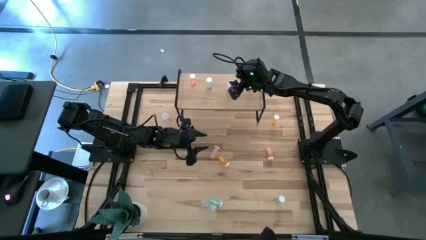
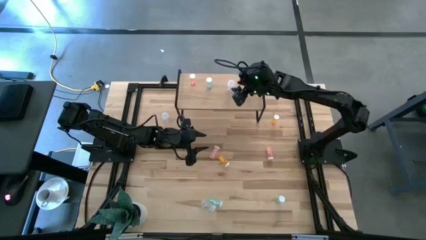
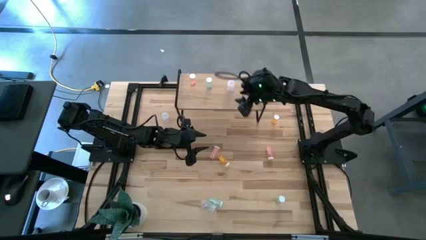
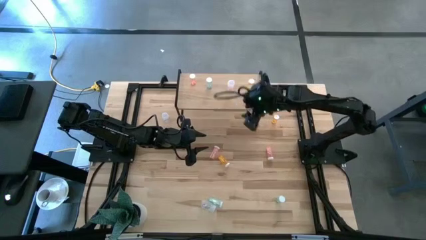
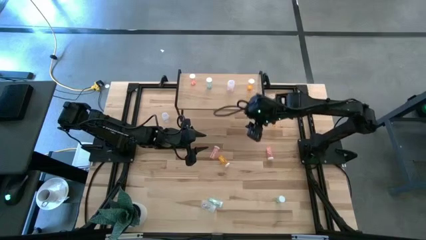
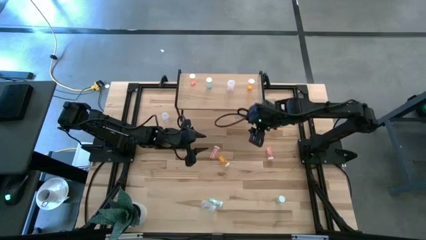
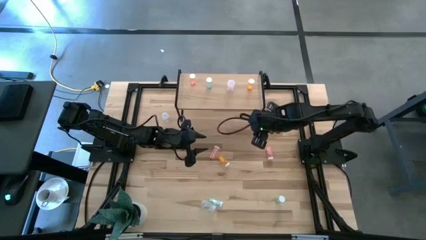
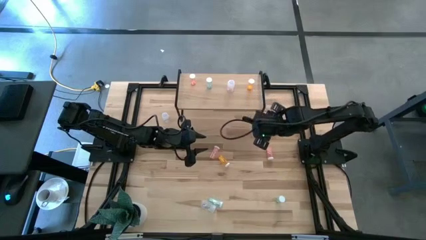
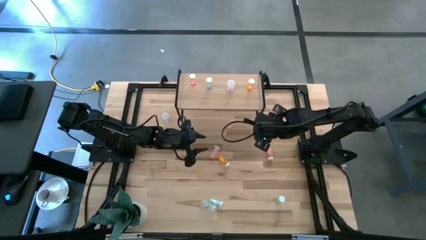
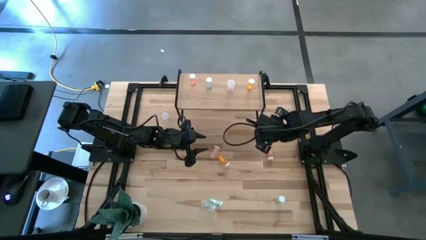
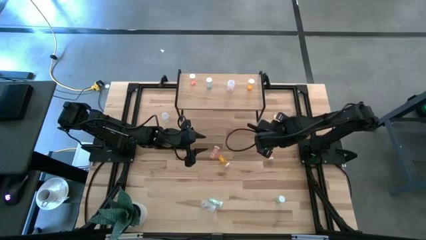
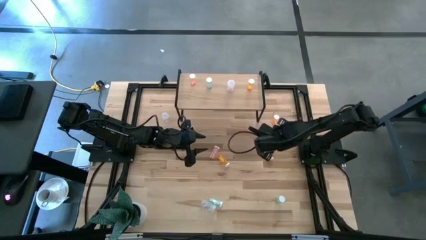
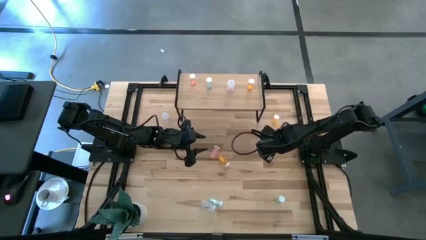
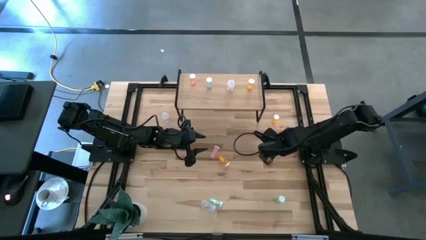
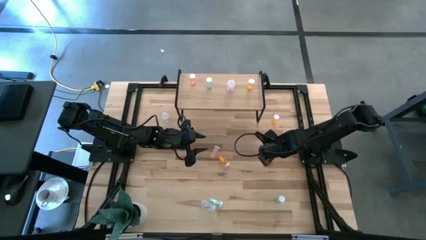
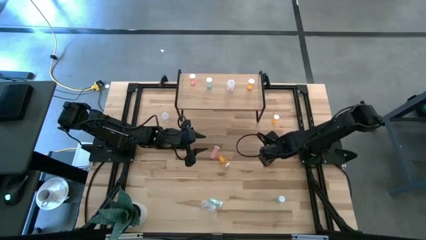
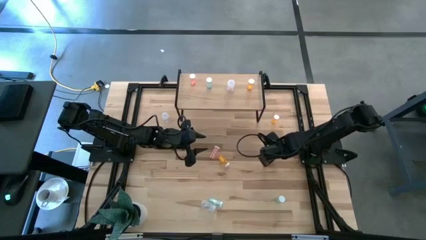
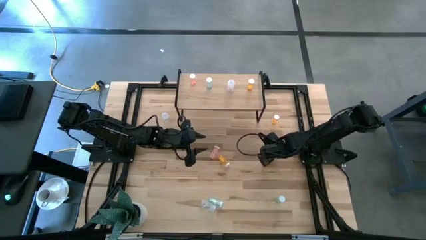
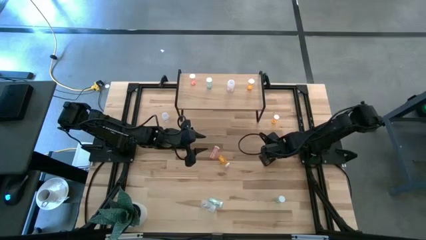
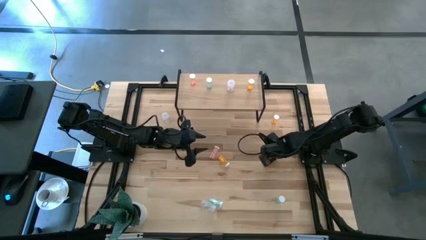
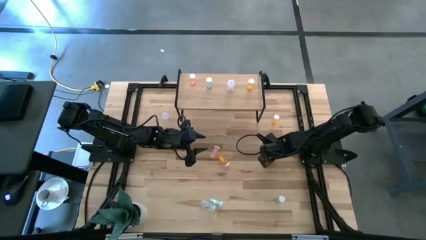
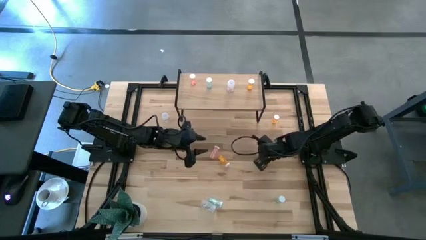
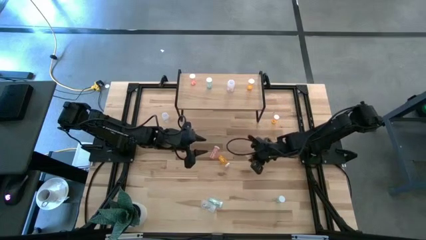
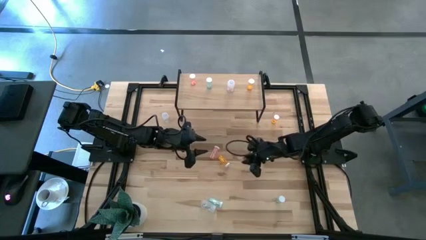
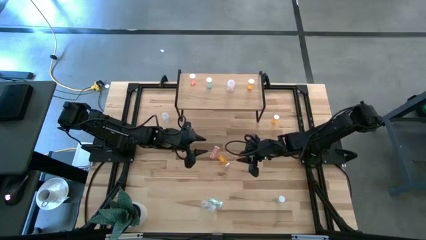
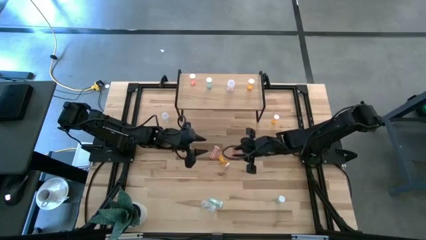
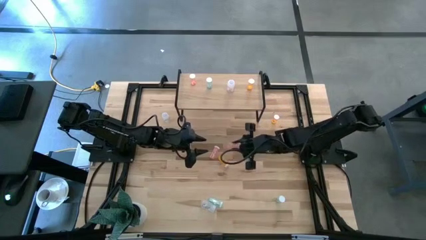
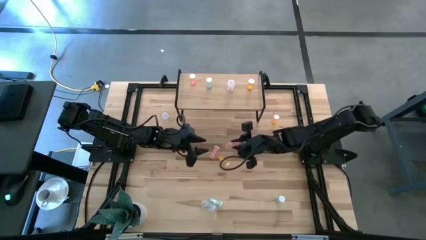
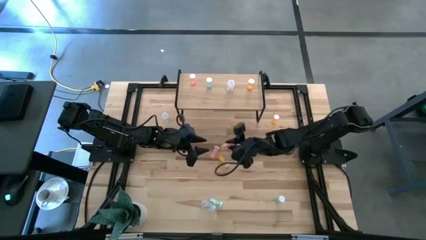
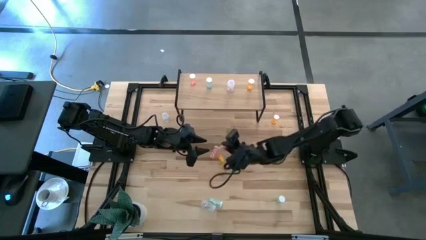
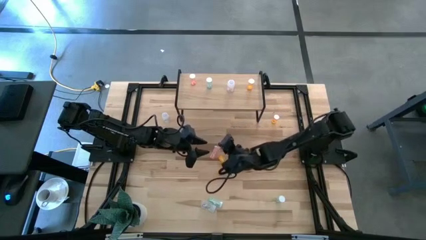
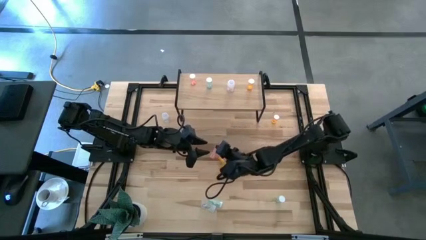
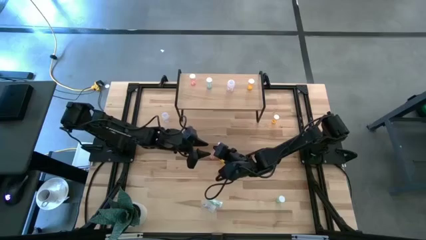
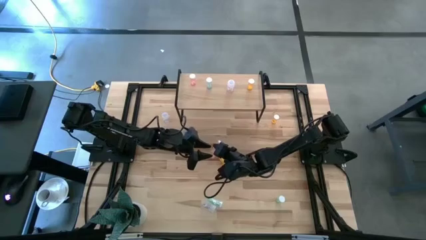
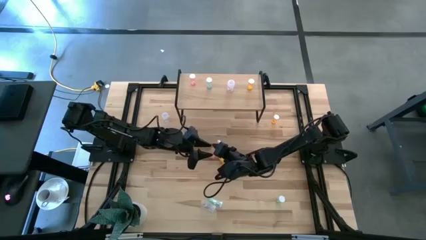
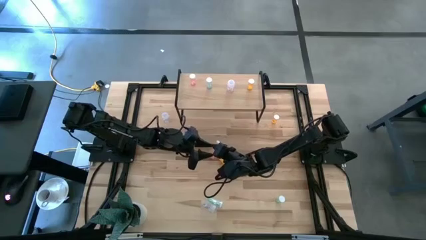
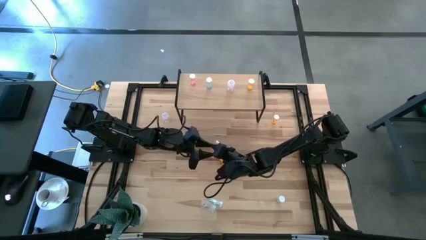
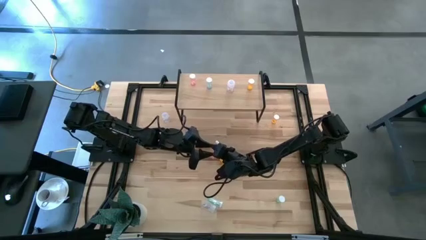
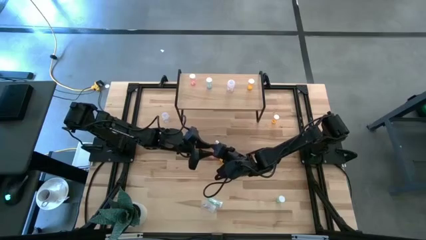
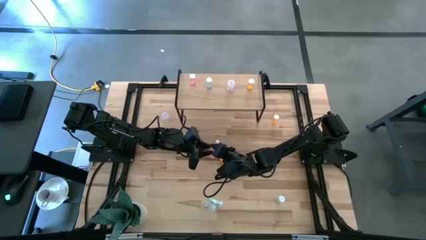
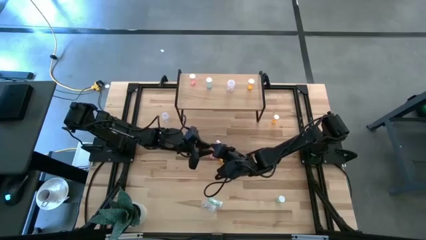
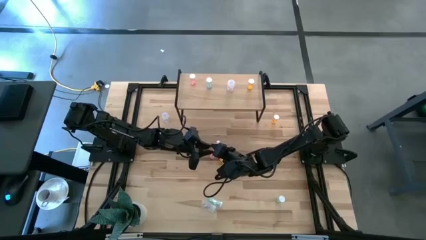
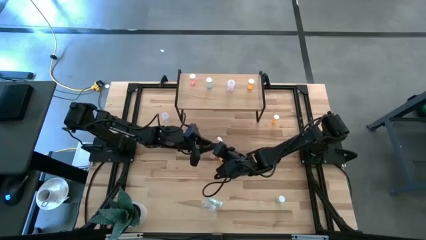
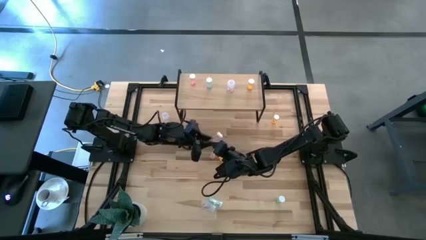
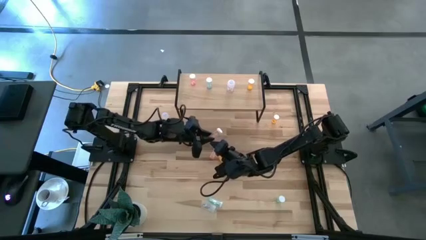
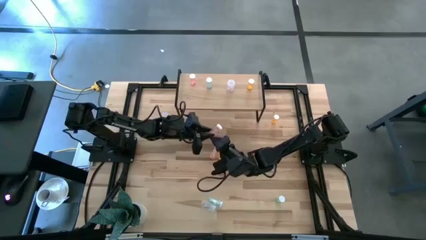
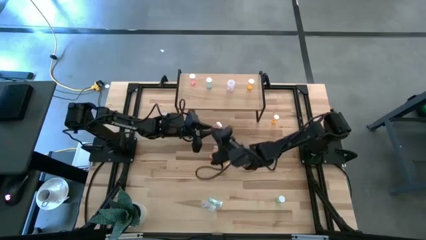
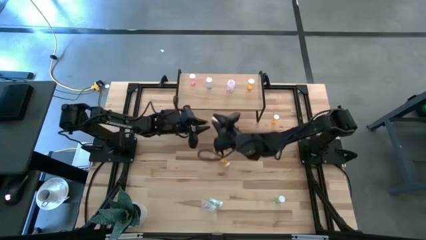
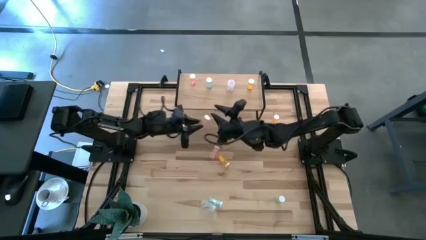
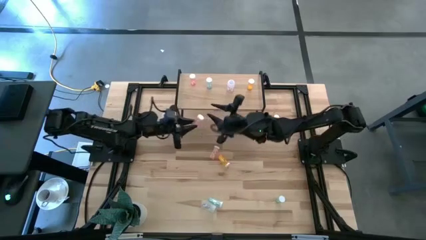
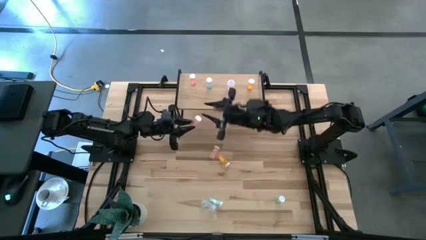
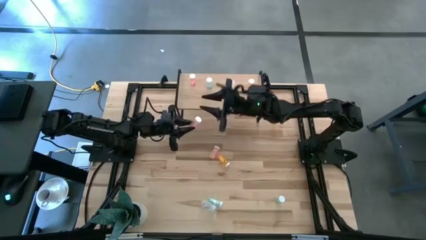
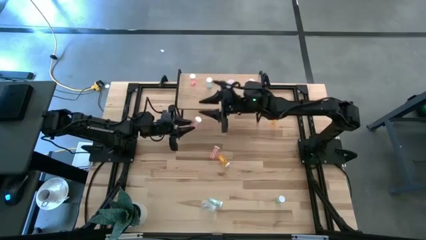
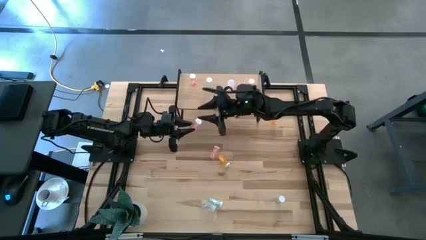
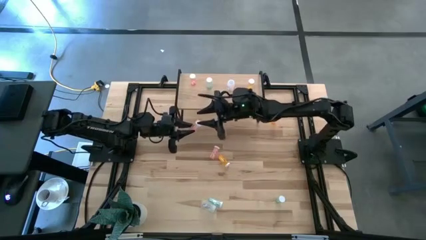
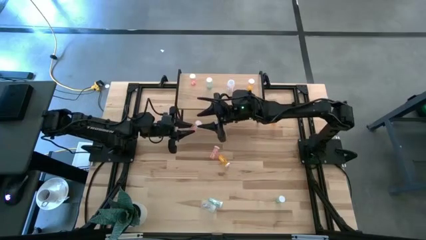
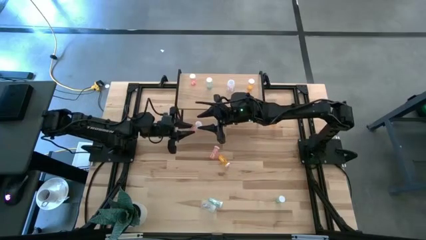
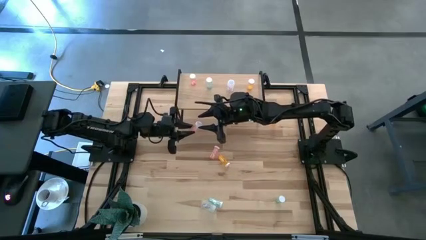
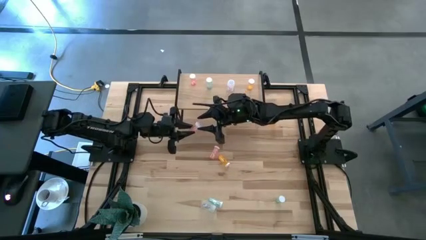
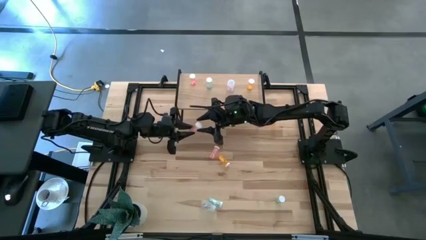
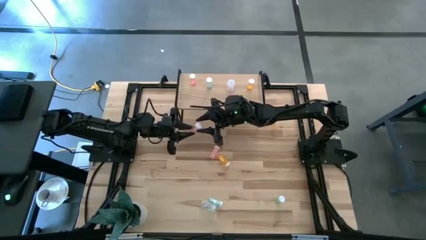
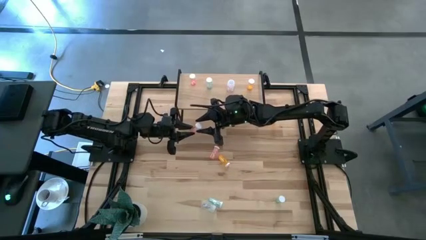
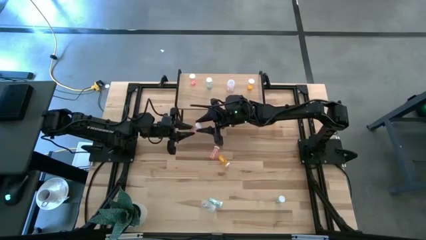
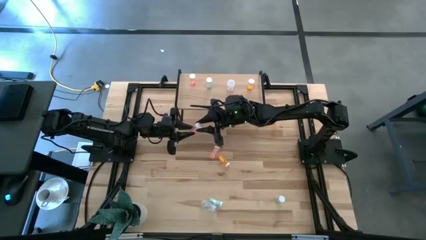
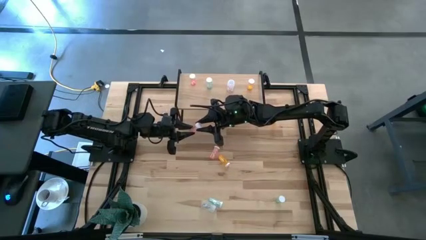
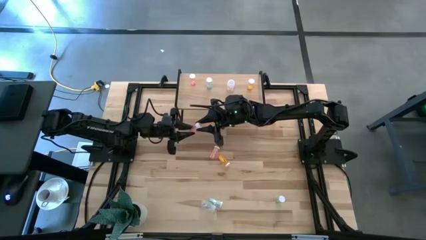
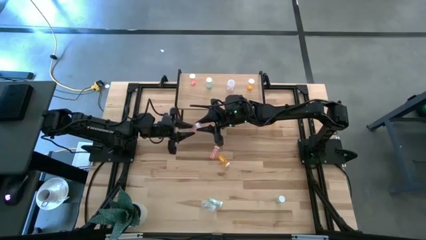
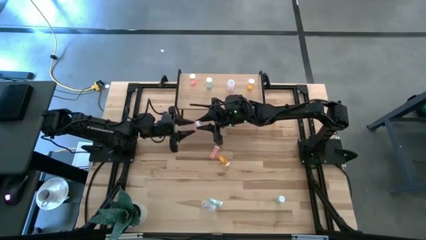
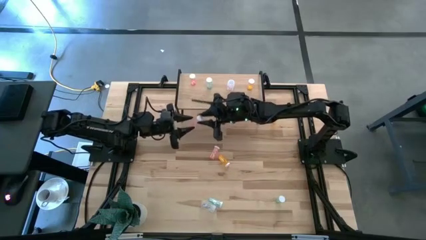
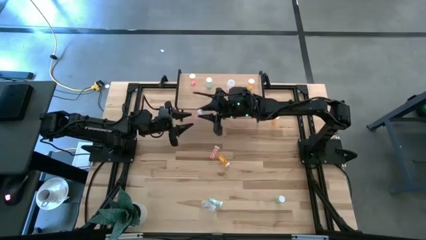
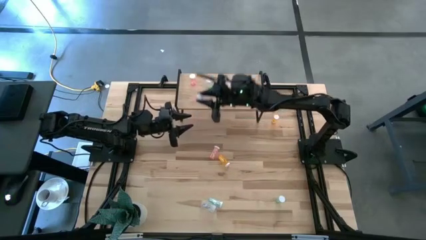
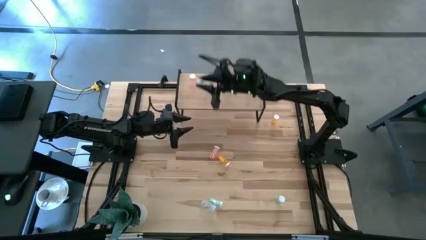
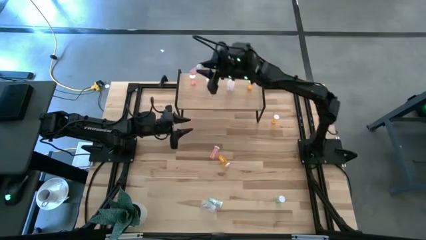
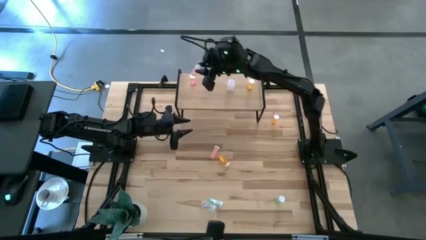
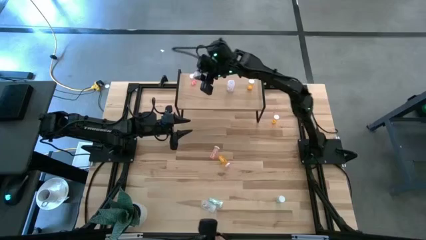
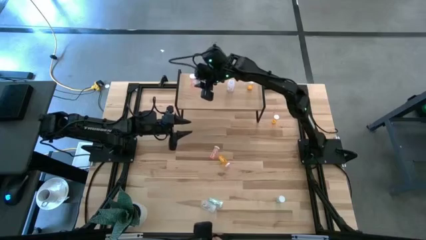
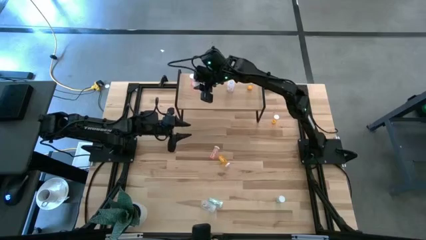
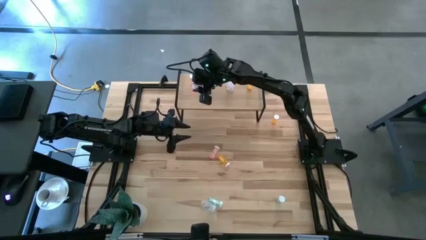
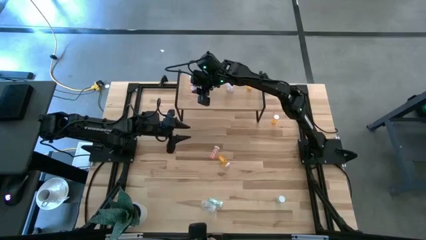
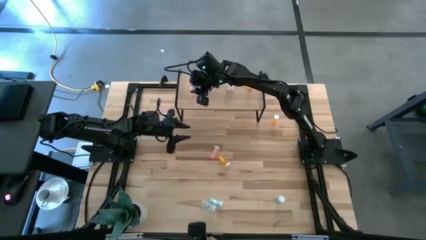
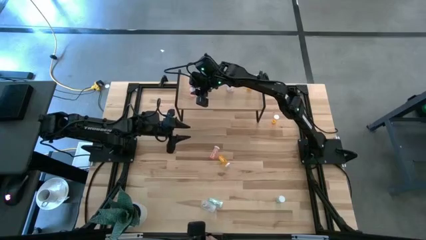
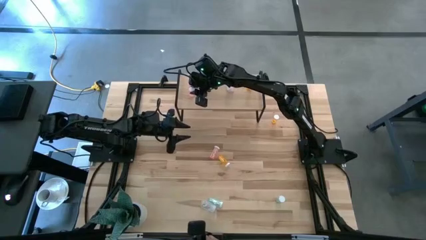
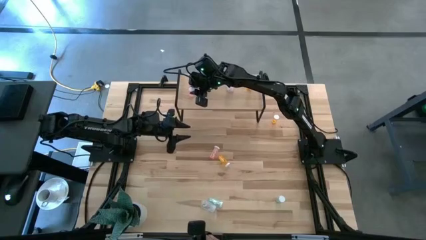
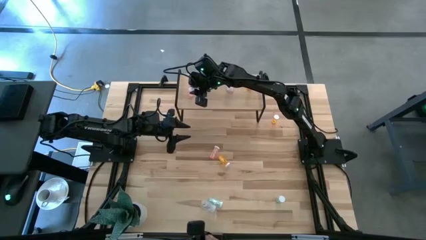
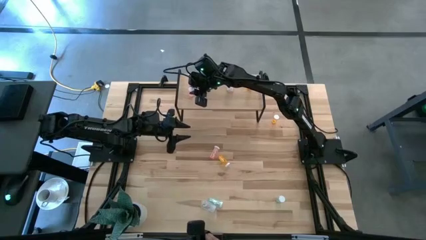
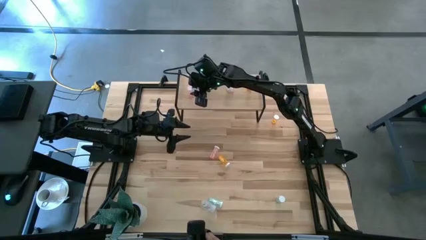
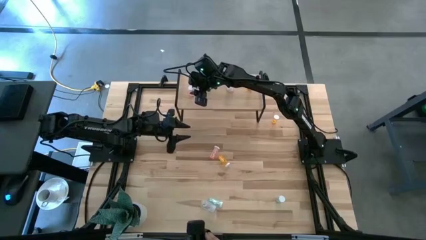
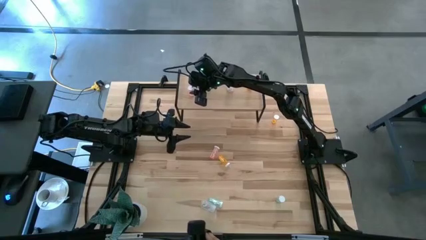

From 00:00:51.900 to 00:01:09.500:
Task: Pick and place medicine bottles onto shelf by color
Put the right pink pill bottle on the shelf aligned with the other pink pill bottle
